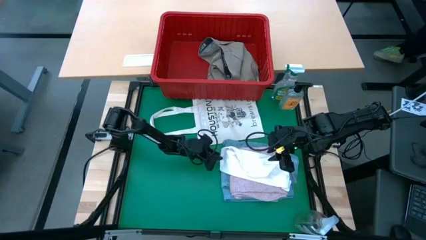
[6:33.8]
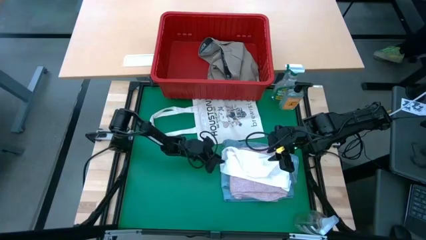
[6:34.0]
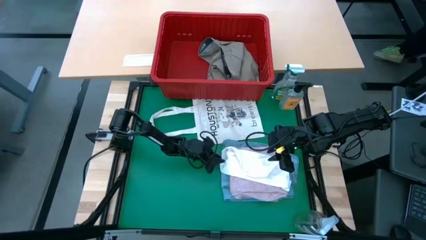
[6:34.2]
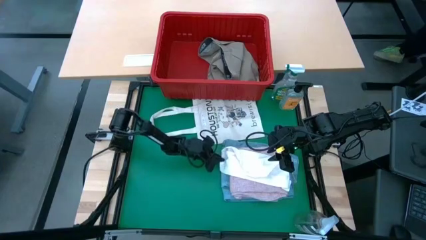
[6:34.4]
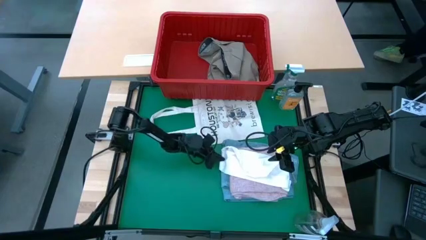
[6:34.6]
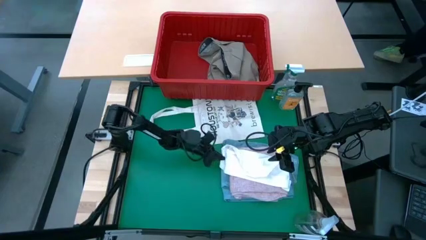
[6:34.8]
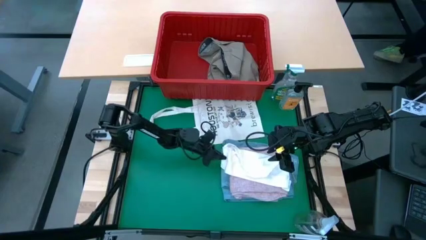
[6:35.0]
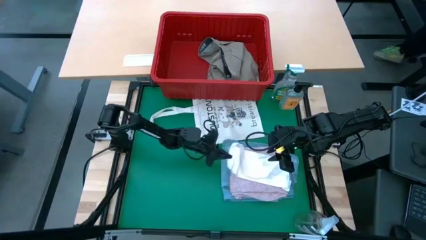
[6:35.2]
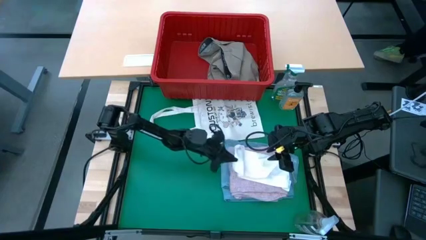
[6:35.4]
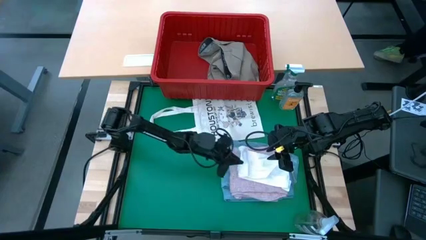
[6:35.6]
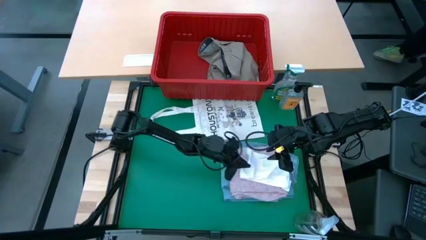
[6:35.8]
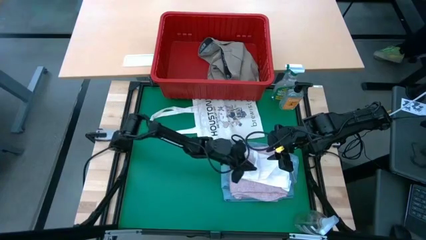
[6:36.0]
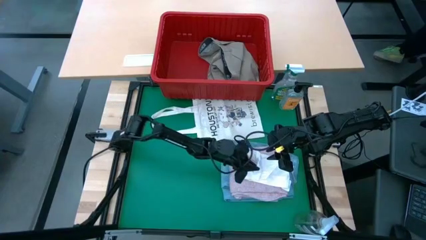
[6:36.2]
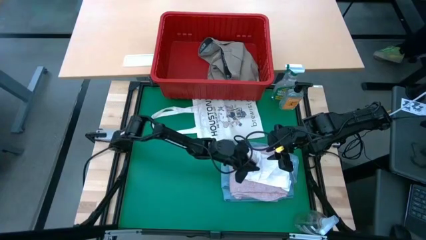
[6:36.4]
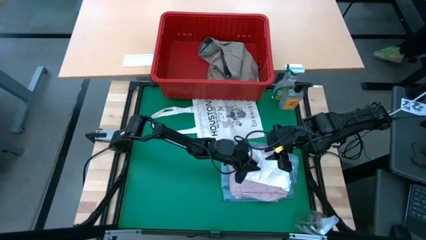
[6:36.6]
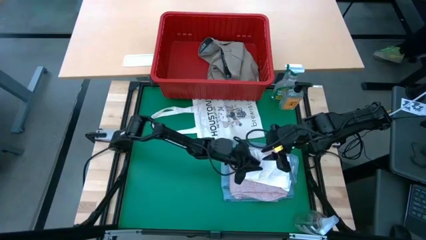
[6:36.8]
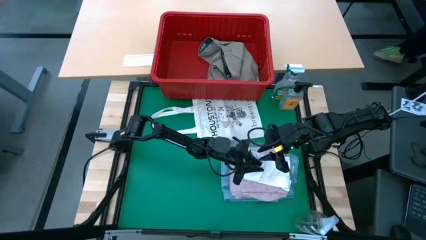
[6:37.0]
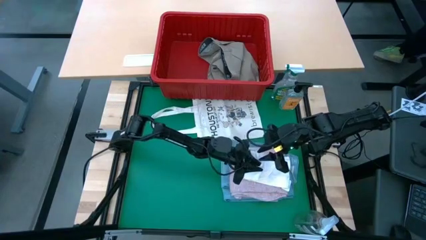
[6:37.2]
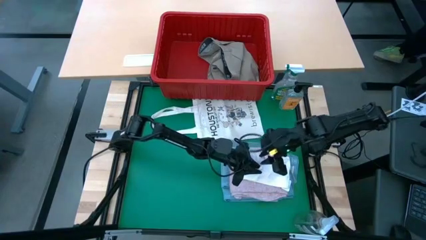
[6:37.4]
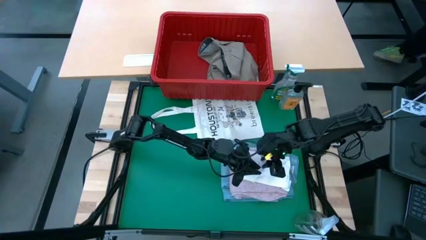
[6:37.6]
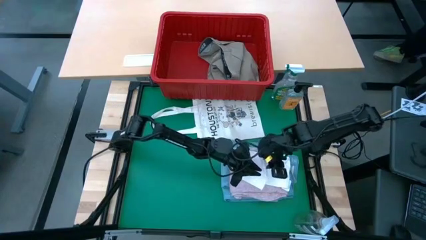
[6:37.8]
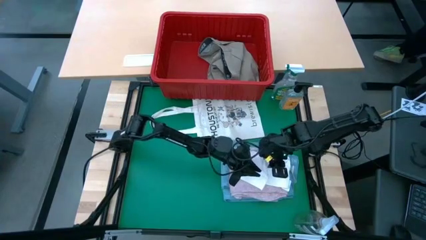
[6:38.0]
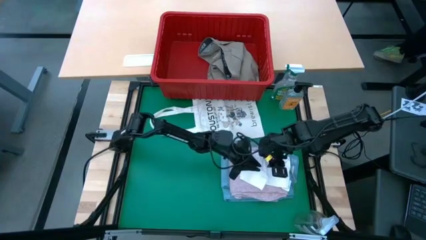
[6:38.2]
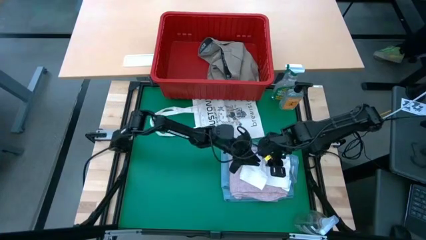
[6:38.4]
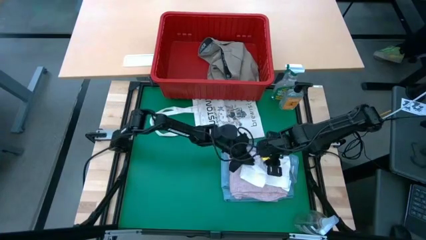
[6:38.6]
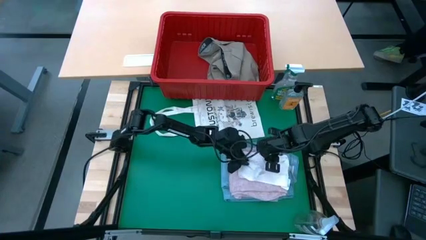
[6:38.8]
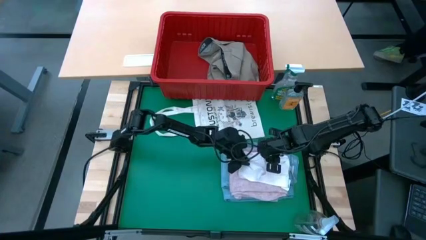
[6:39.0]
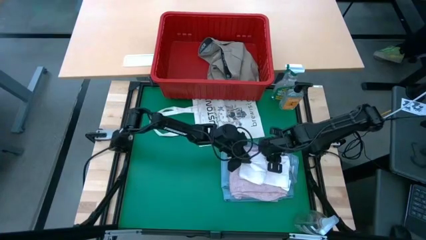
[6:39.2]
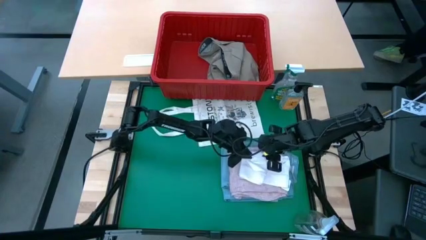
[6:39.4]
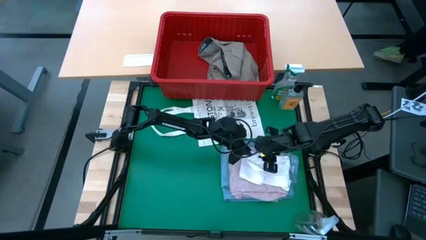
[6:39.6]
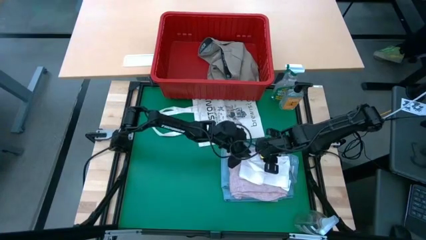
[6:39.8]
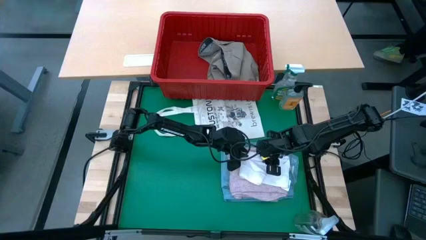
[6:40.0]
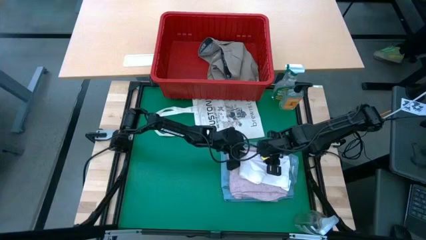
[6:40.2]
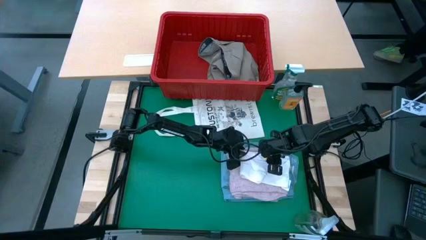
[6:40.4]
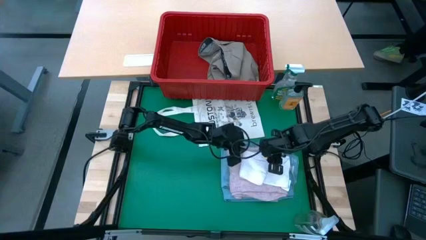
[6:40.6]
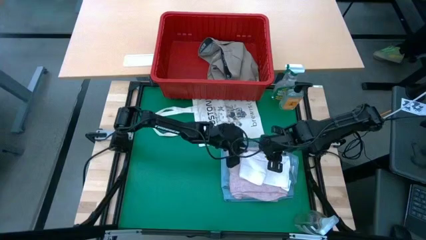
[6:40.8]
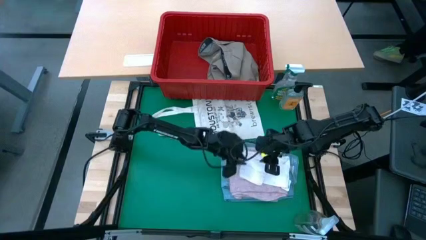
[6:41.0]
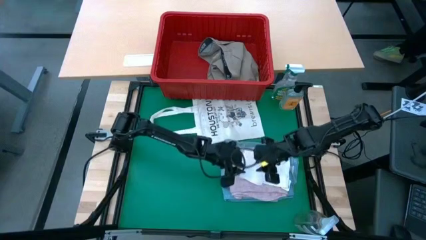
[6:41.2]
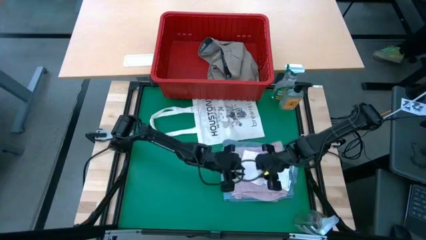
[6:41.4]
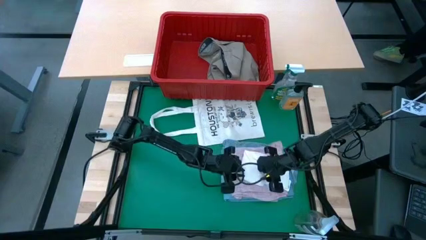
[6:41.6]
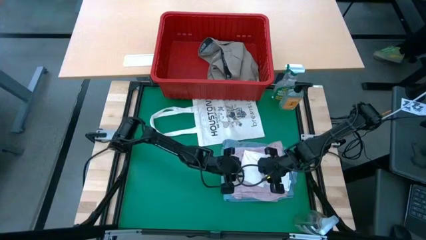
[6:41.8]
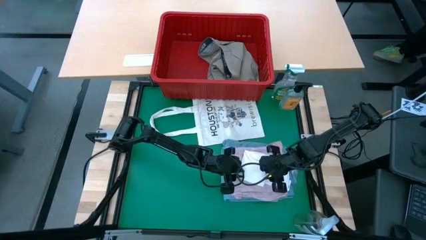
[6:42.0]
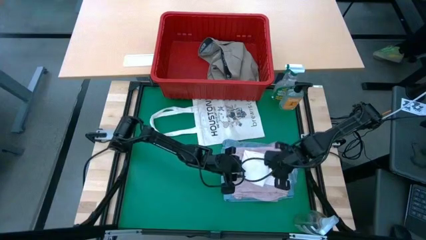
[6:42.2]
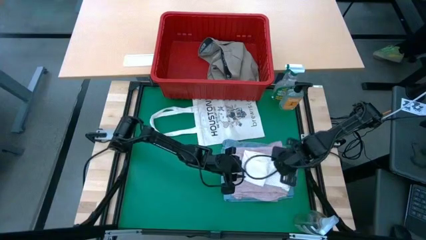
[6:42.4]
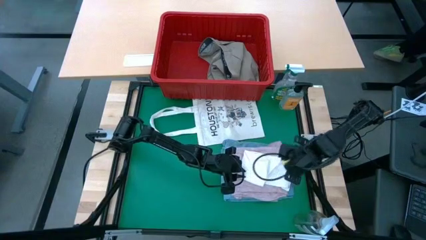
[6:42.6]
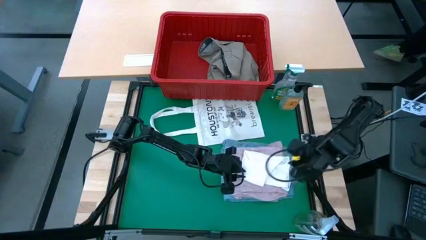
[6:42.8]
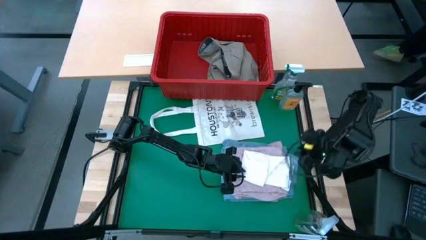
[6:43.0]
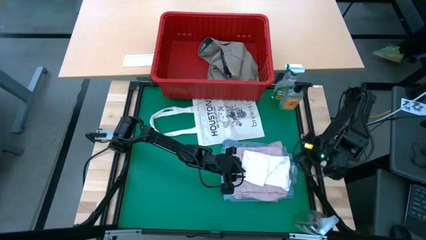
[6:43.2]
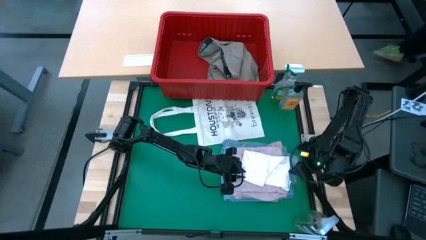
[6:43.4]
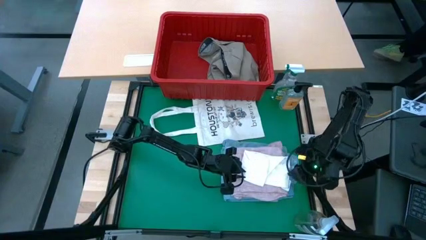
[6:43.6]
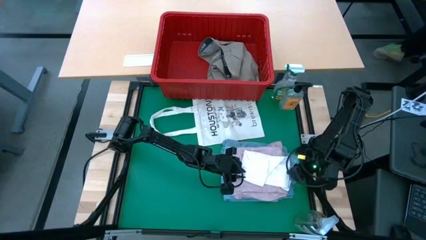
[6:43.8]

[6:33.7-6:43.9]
Task: Fold Laundry from Bin
Fold the white underwear from the red laundry basket
